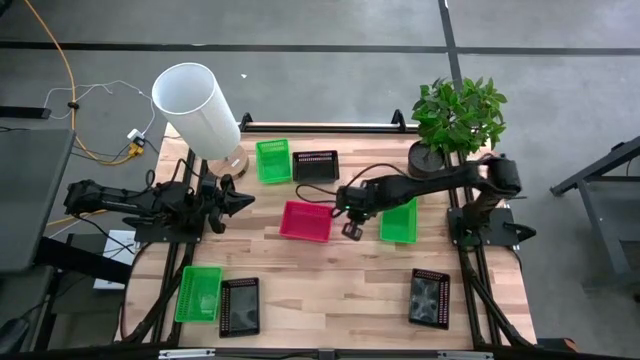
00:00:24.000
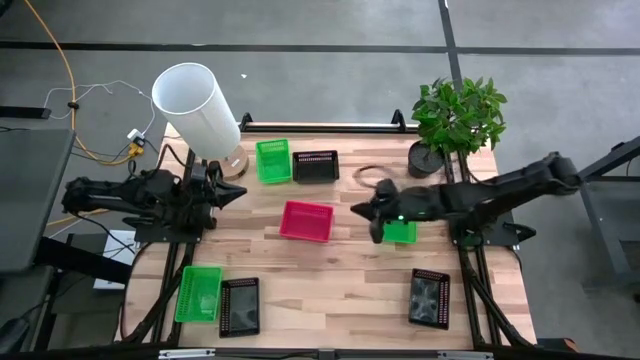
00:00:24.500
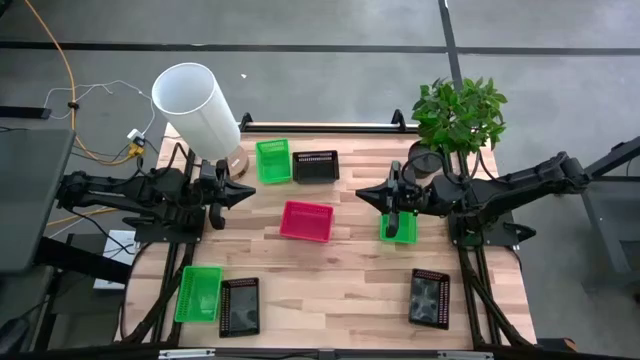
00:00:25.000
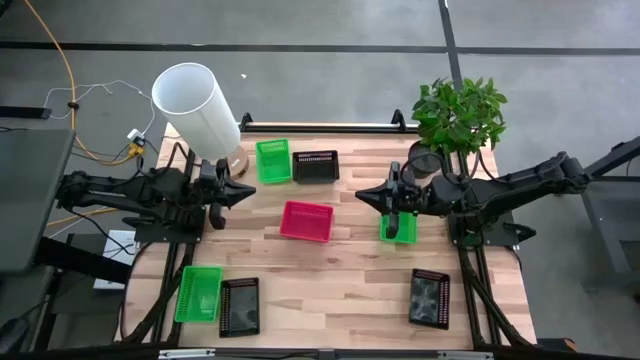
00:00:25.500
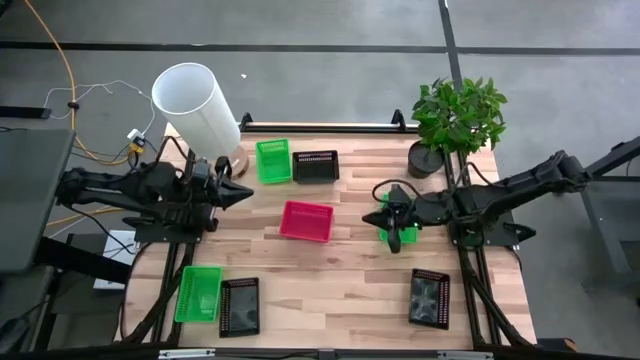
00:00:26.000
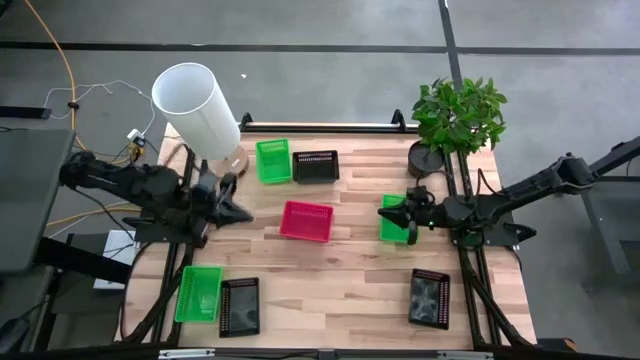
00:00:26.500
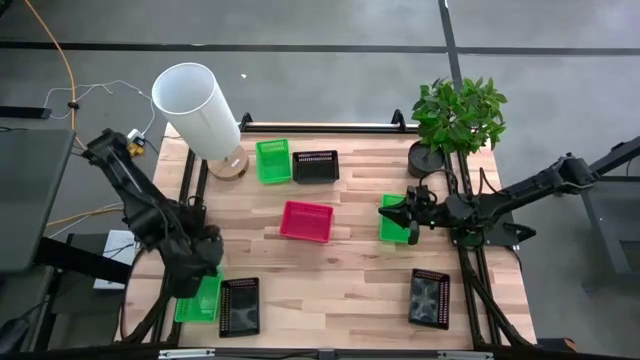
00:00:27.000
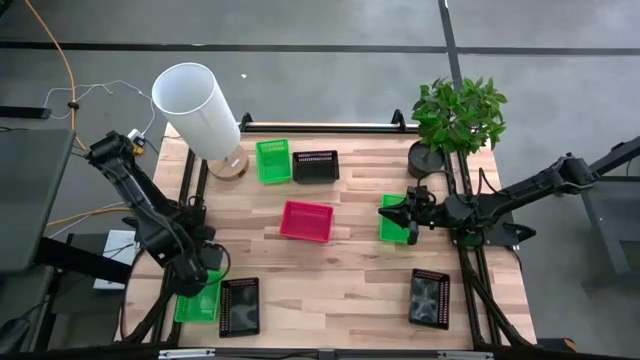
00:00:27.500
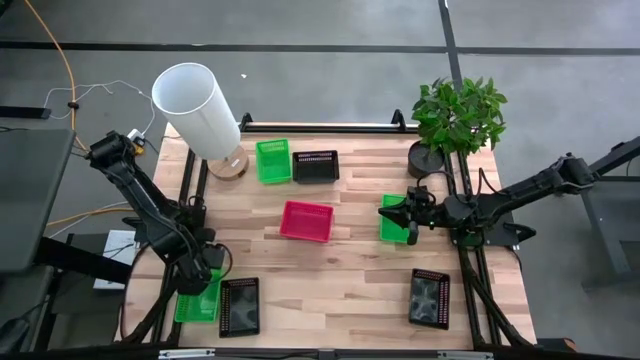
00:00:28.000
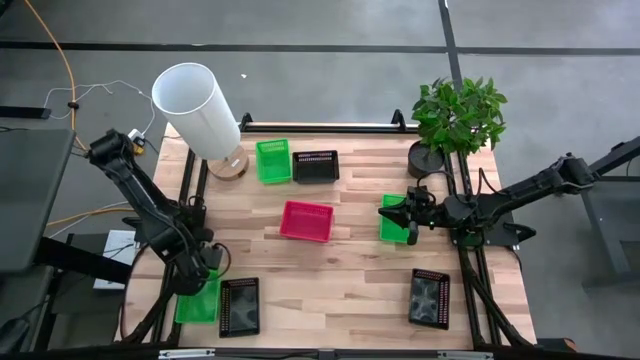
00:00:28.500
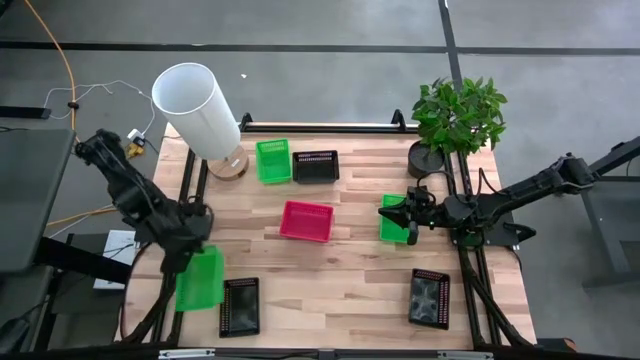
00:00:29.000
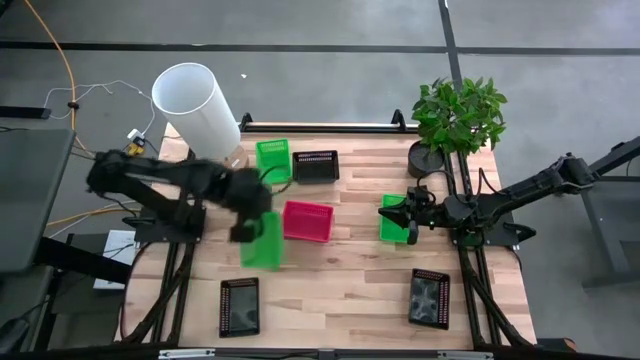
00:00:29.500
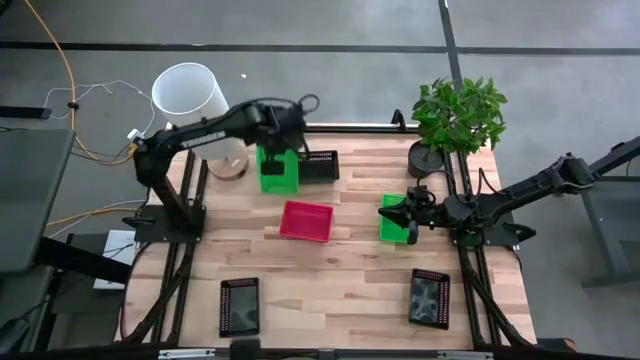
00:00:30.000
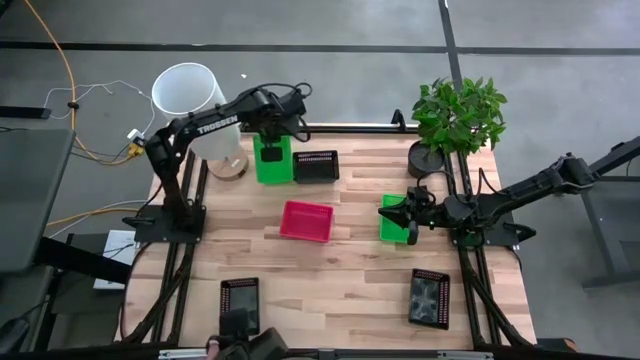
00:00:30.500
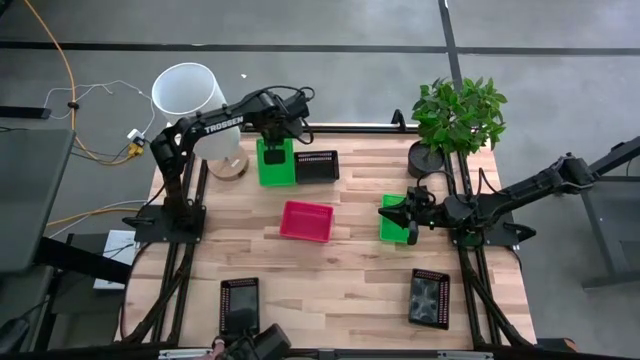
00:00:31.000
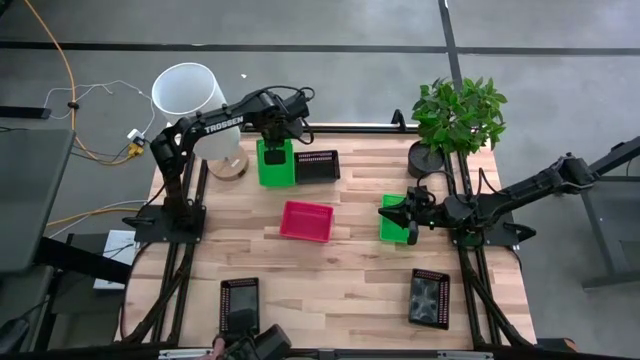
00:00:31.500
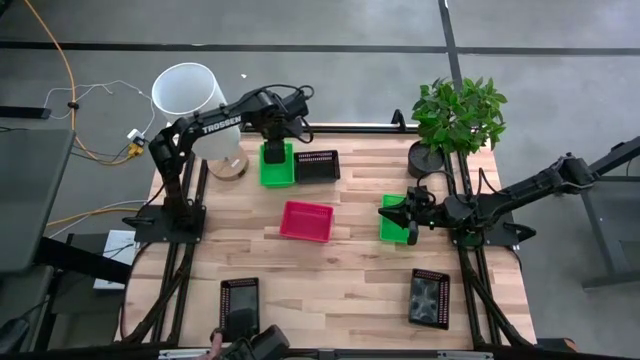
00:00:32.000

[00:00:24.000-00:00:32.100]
Stack the bottom left green bin on the top left green bin

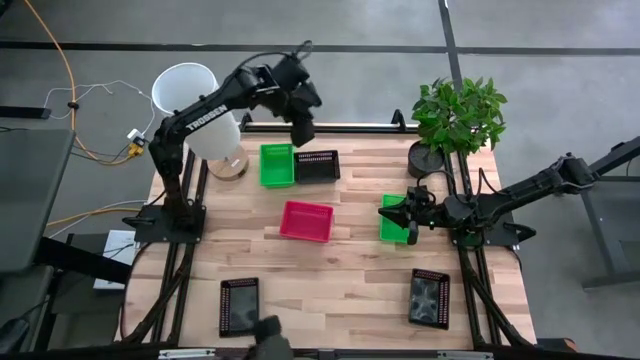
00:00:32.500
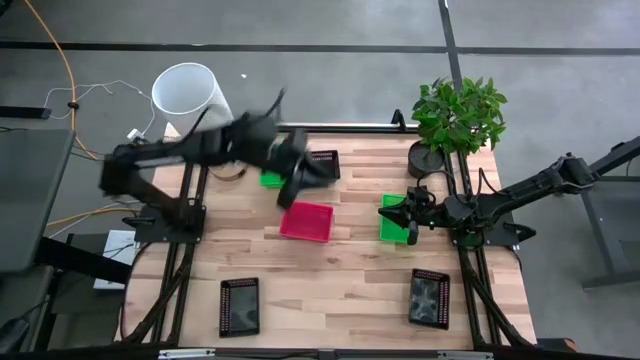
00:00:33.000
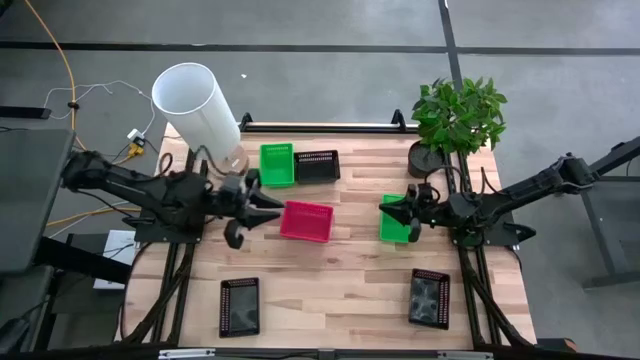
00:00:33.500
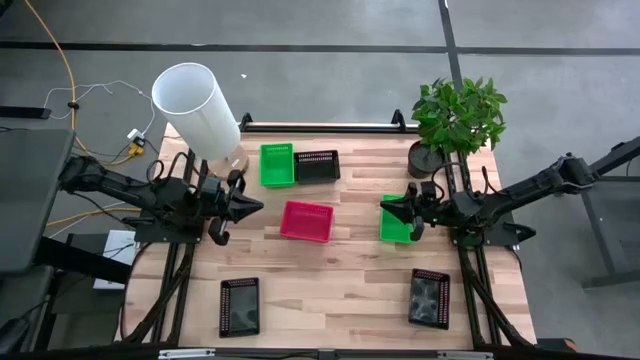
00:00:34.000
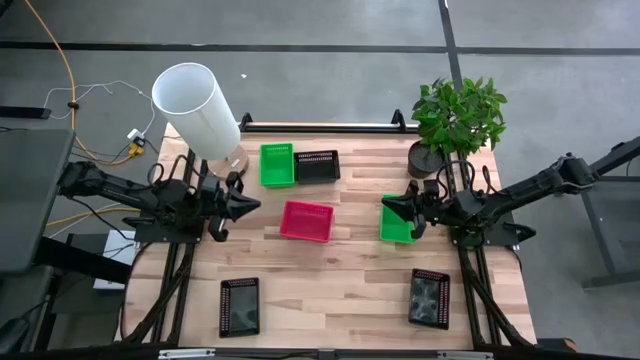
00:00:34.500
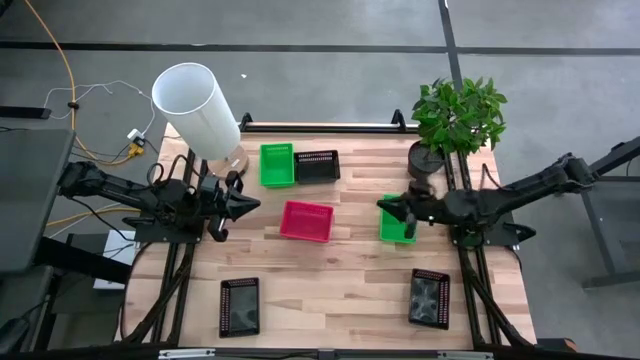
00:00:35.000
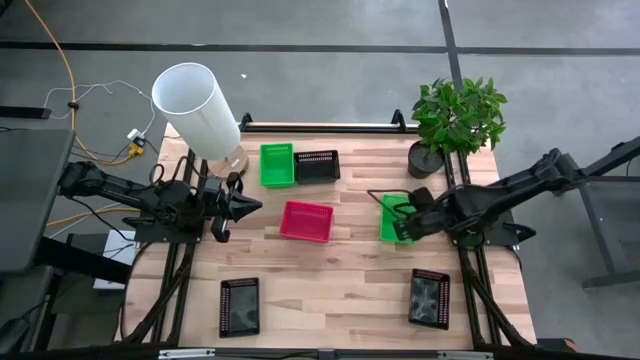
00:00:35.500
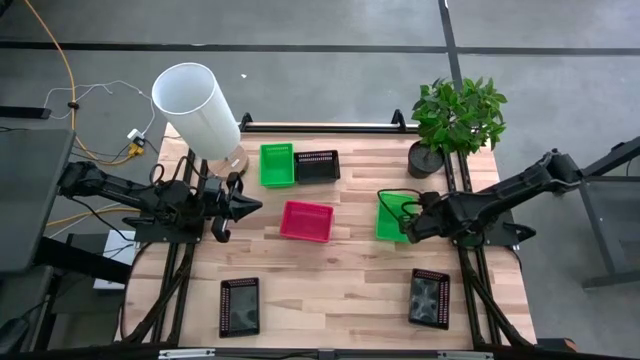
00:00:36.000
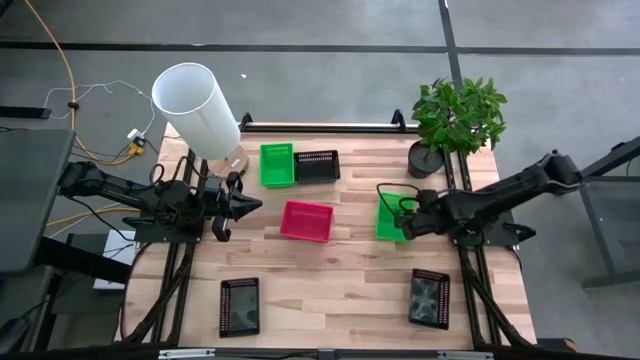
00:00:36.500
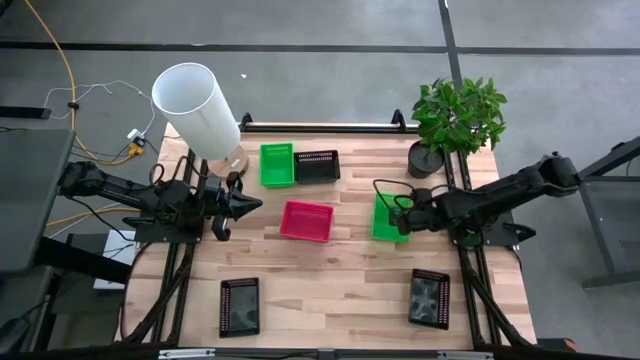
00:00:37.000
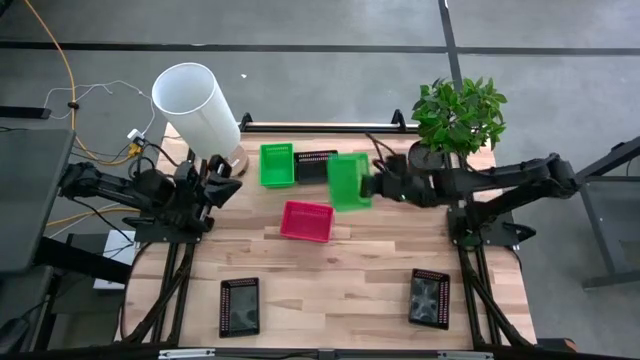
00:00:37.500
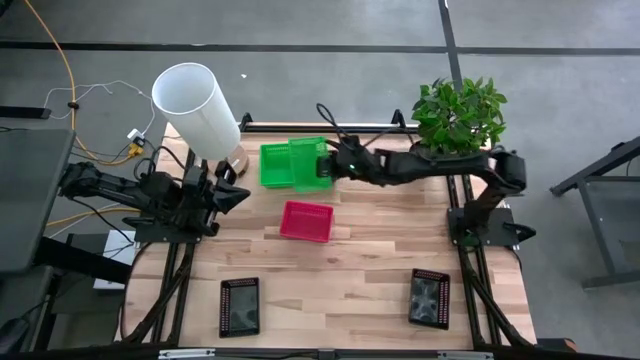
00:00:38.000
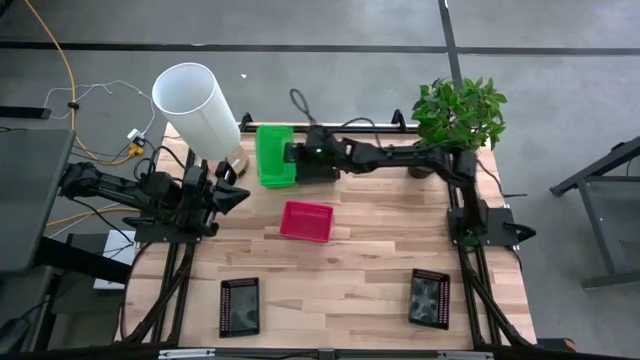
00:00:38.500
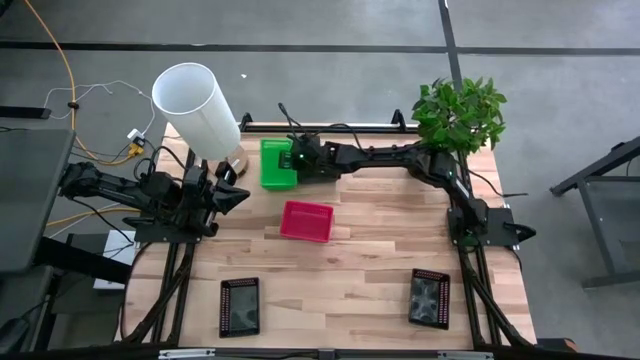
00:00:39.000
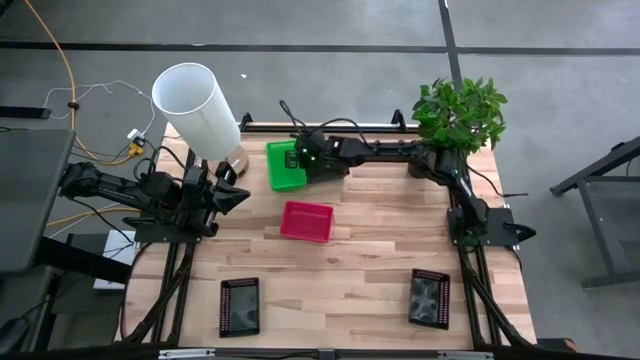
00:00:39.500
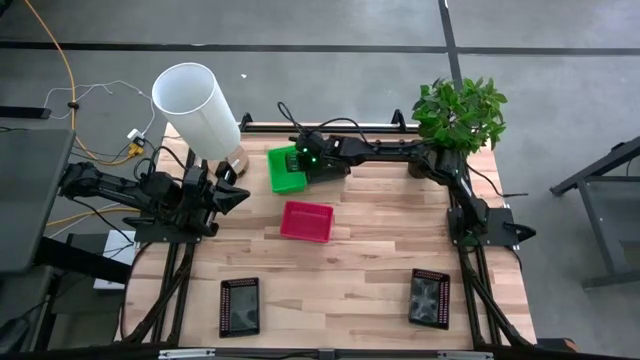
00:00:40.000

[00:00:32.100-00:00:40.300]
Stack the green bin on the green bin

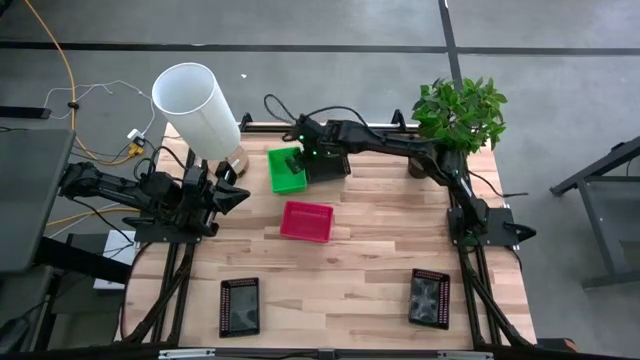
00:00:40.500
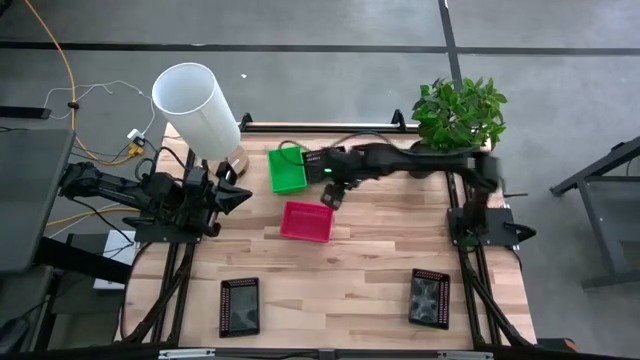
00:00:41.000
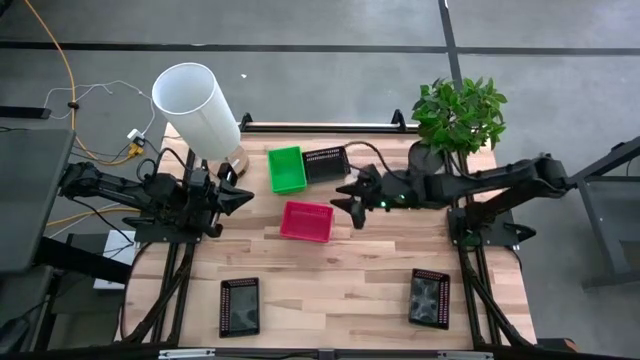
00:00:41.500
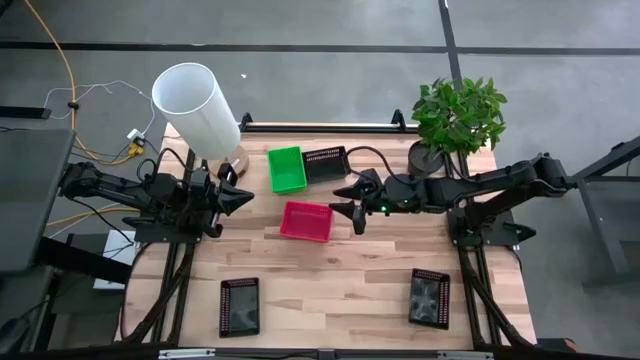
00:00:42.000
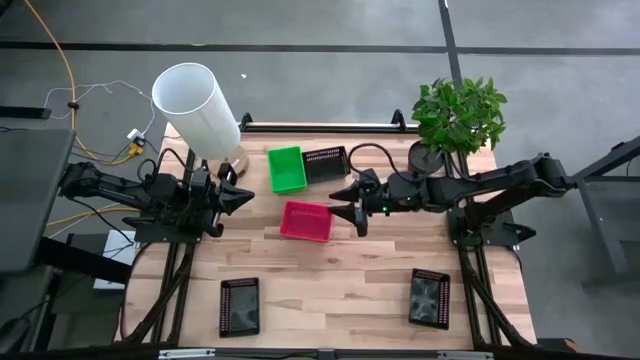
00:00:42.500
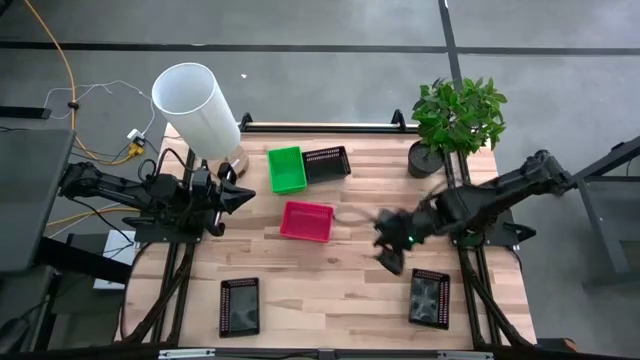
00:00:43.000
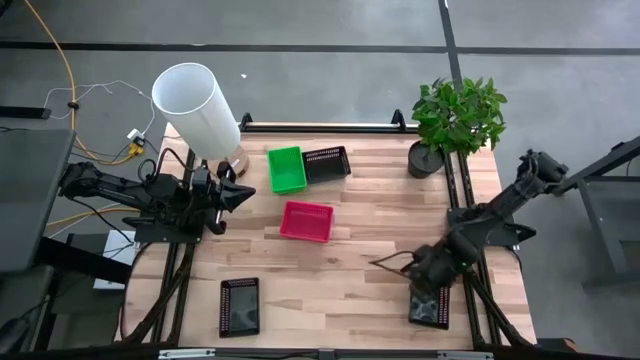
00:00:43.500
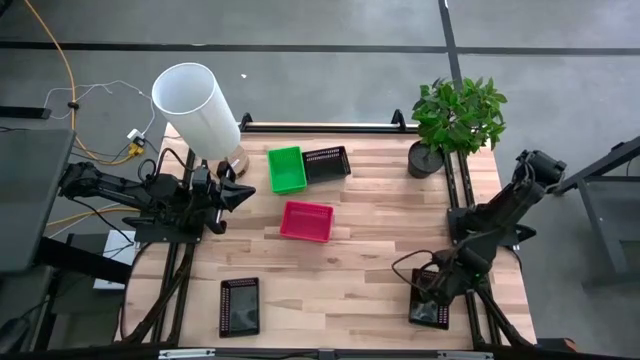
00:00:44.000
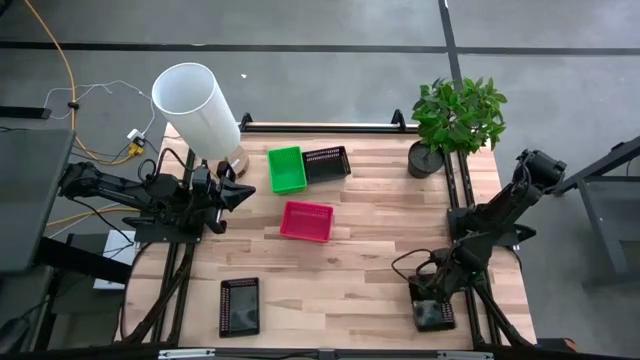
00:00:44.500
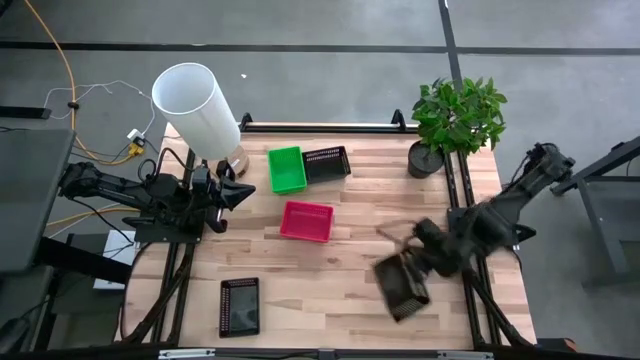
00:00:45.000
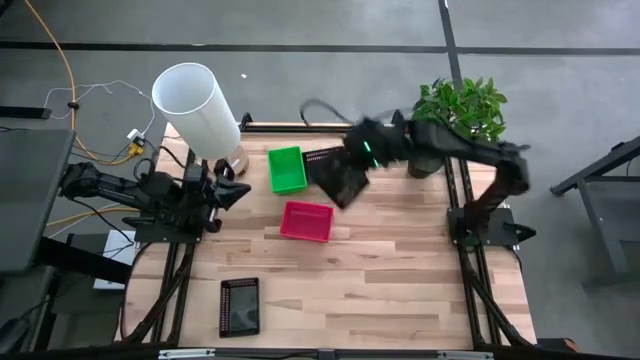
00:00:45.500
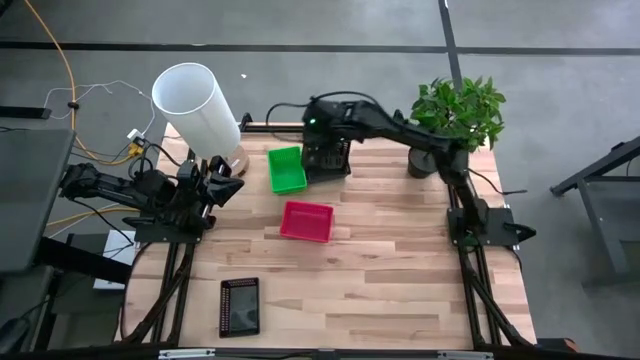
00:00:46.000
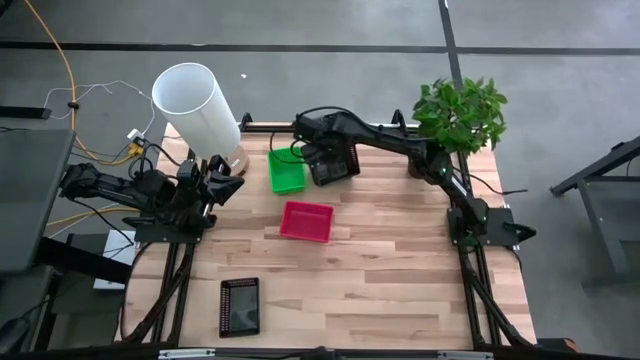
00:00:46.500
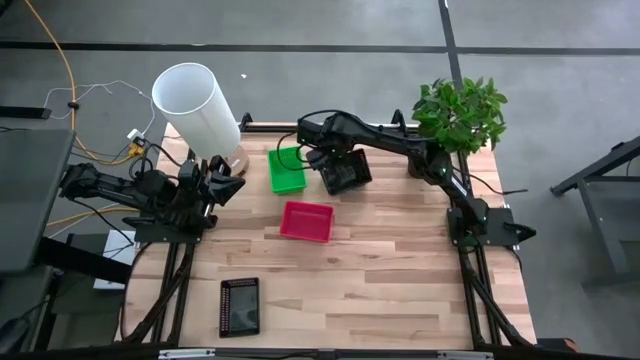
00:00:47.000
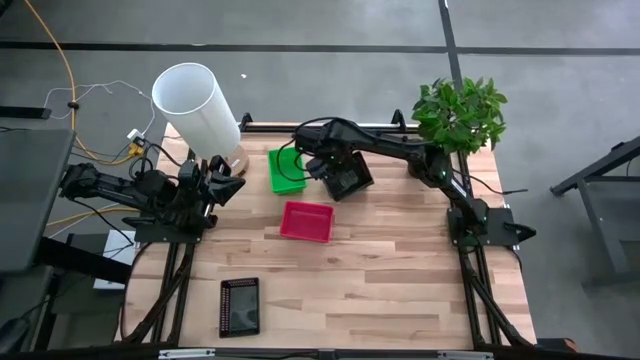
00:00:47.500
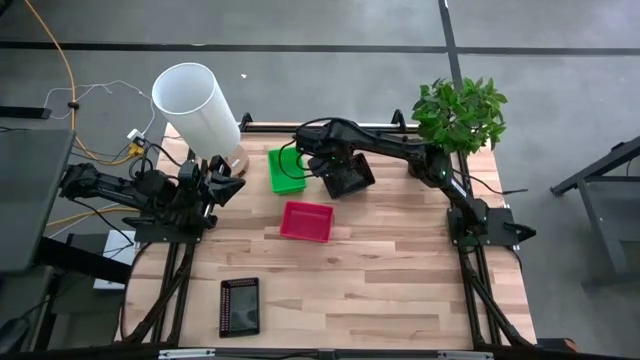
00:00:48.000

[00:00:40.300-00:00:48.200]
Stack the bottom right black bin on the top black bin
